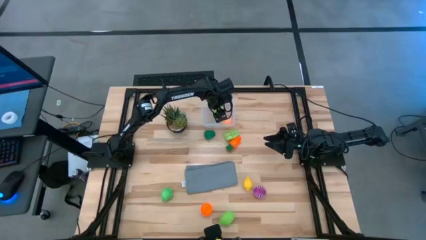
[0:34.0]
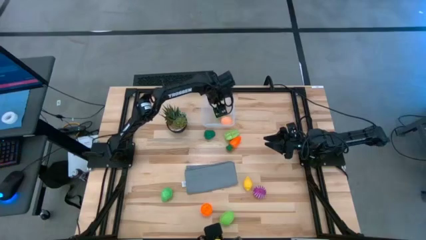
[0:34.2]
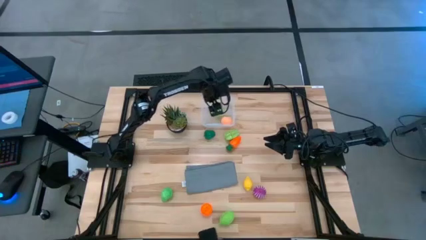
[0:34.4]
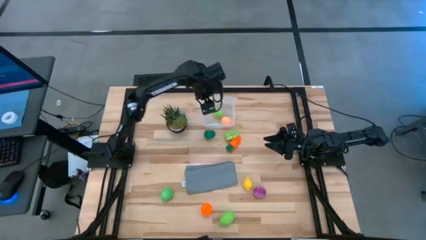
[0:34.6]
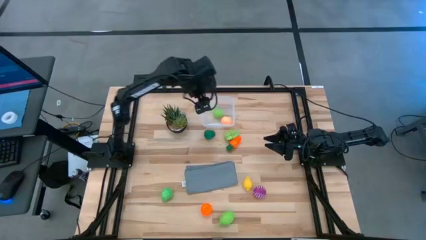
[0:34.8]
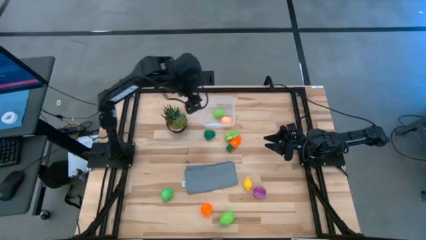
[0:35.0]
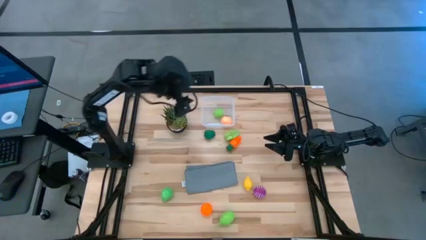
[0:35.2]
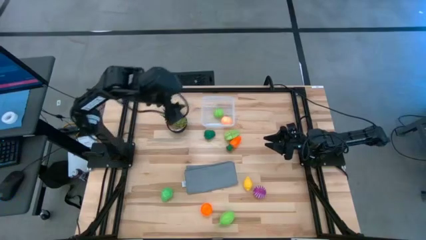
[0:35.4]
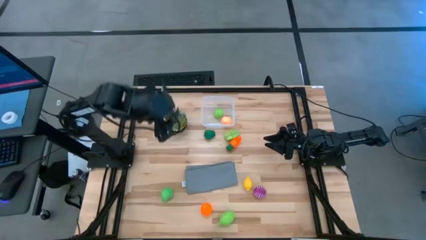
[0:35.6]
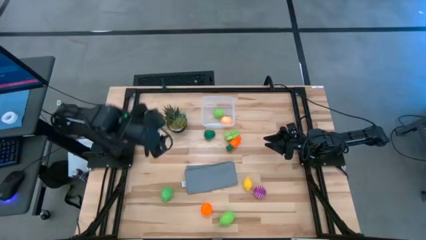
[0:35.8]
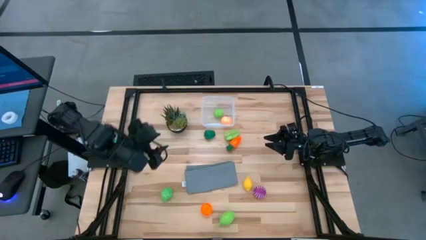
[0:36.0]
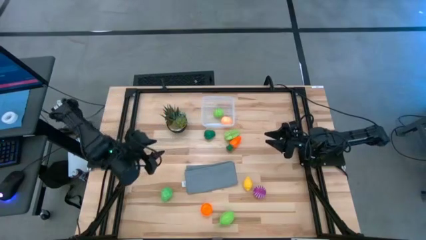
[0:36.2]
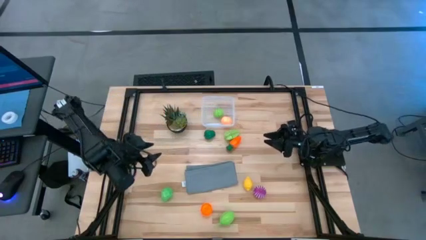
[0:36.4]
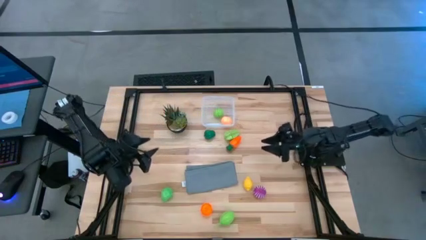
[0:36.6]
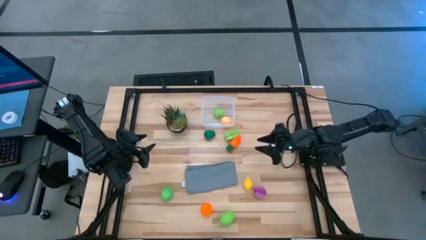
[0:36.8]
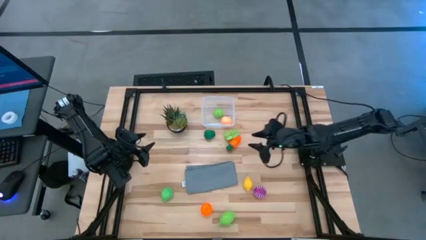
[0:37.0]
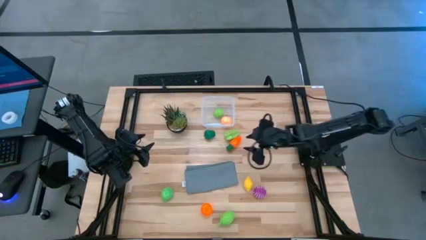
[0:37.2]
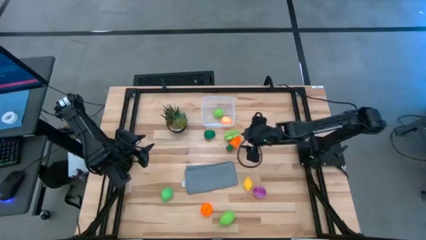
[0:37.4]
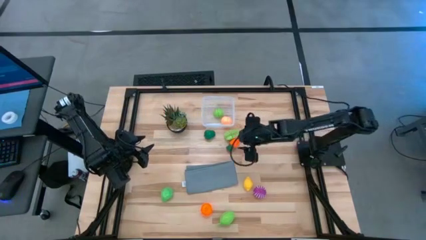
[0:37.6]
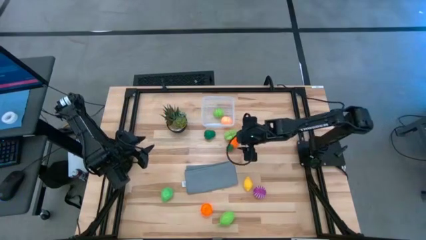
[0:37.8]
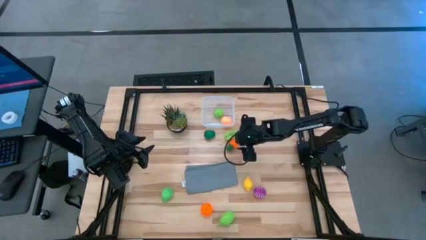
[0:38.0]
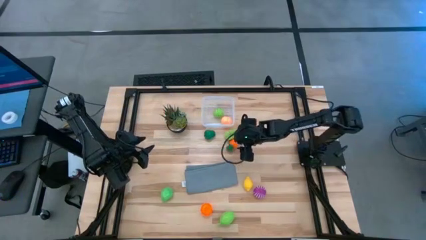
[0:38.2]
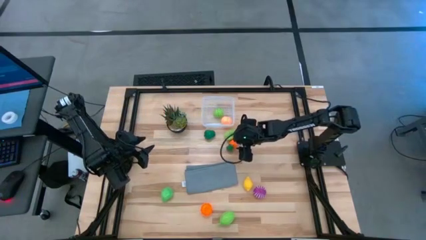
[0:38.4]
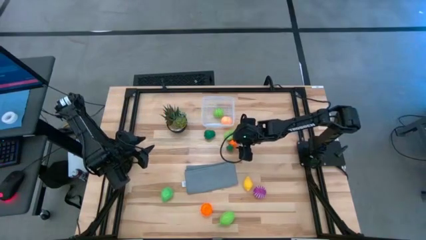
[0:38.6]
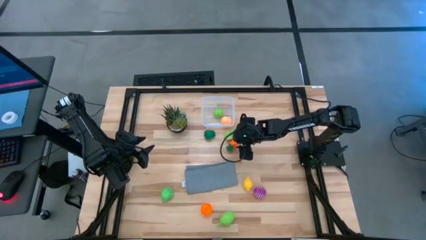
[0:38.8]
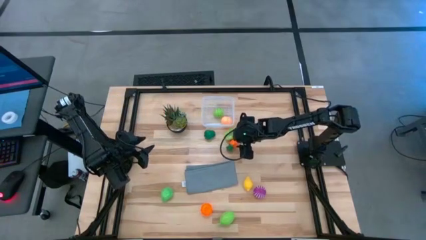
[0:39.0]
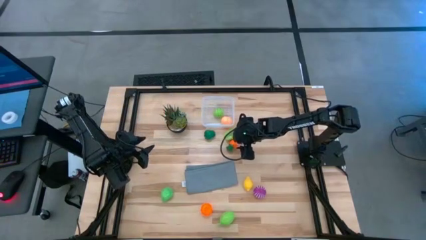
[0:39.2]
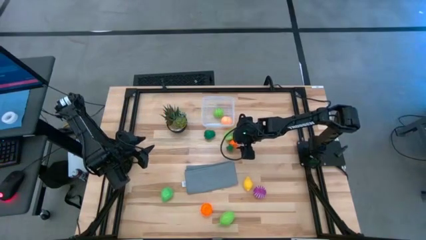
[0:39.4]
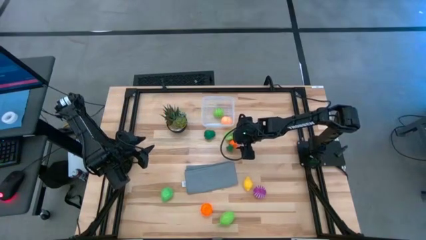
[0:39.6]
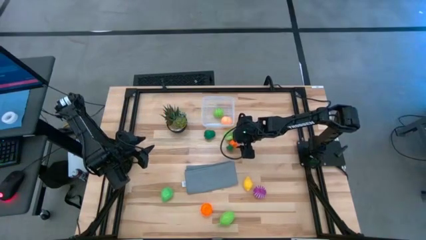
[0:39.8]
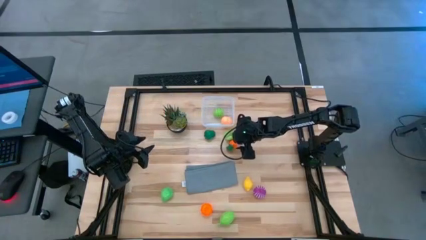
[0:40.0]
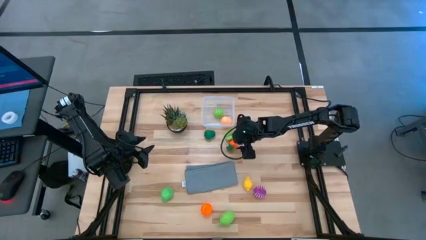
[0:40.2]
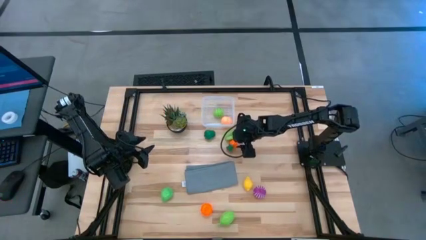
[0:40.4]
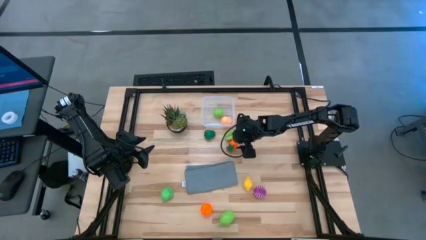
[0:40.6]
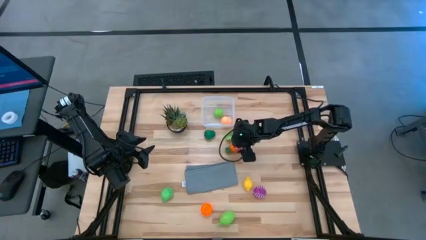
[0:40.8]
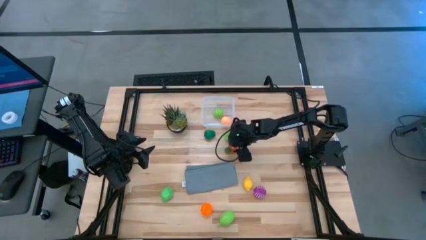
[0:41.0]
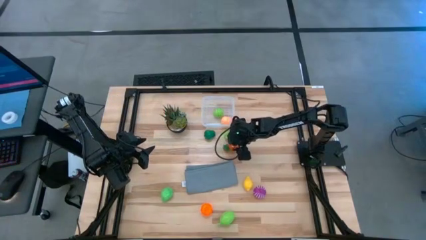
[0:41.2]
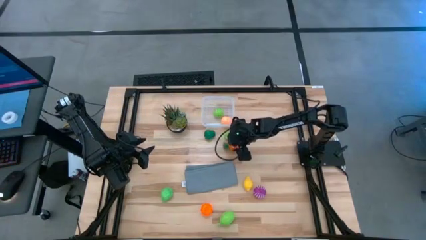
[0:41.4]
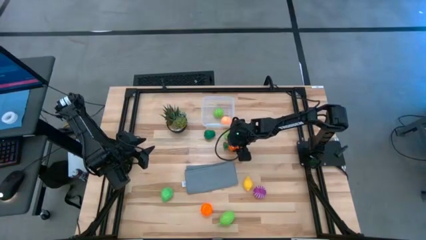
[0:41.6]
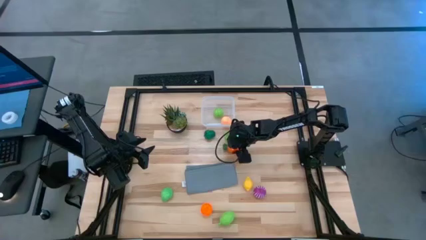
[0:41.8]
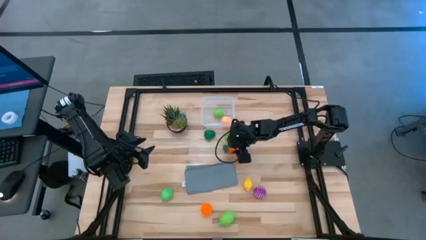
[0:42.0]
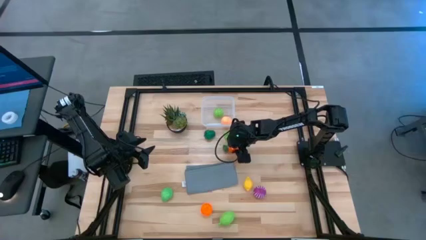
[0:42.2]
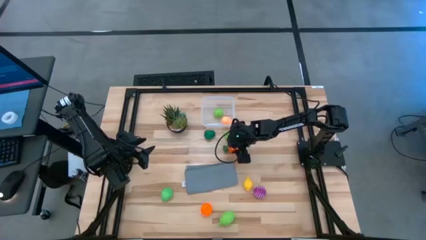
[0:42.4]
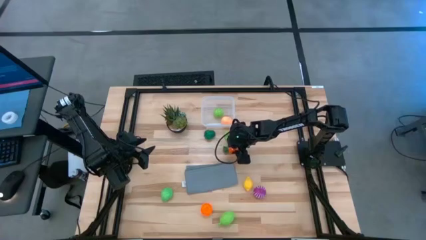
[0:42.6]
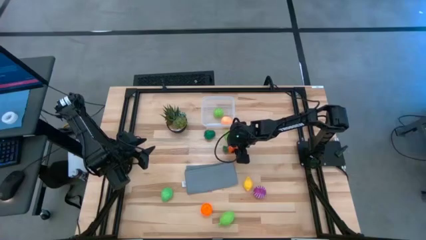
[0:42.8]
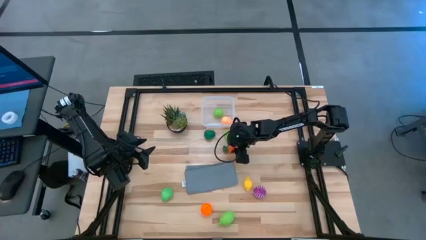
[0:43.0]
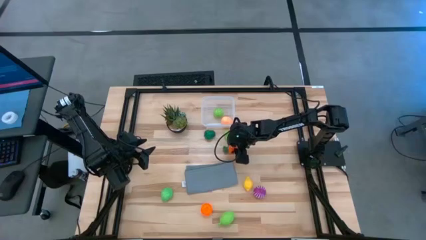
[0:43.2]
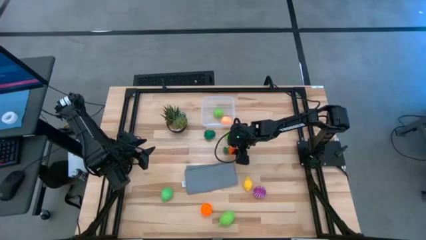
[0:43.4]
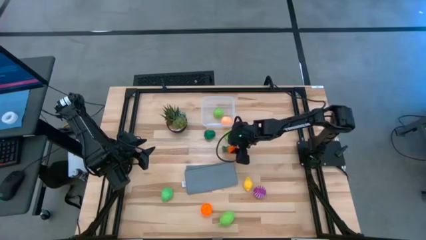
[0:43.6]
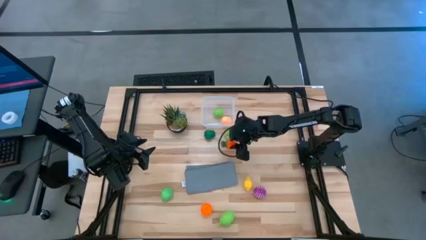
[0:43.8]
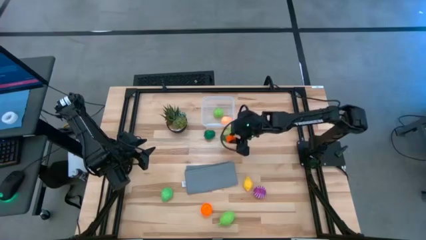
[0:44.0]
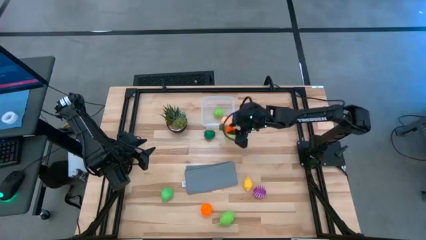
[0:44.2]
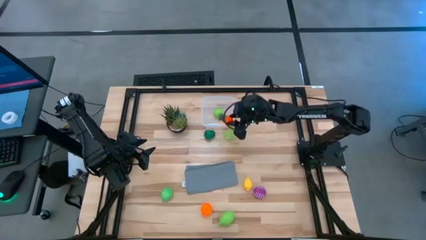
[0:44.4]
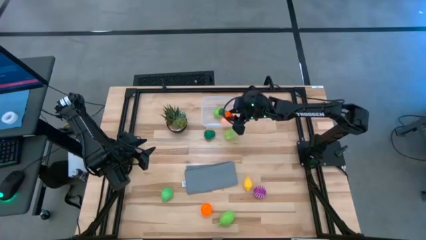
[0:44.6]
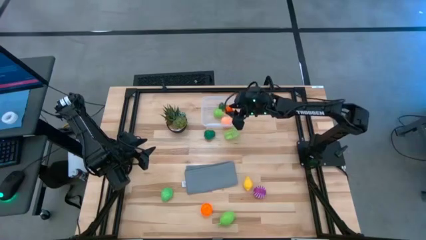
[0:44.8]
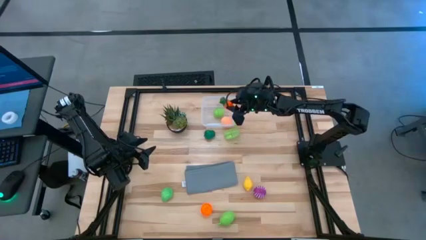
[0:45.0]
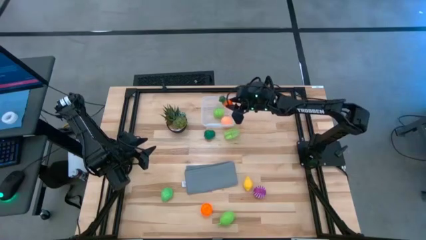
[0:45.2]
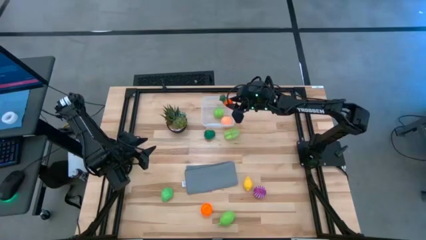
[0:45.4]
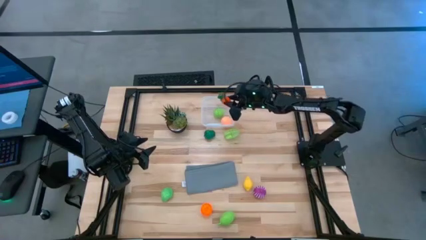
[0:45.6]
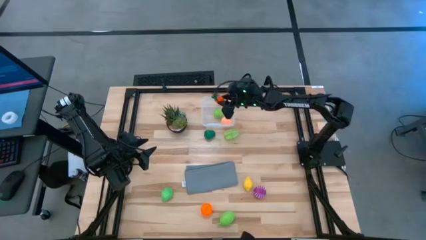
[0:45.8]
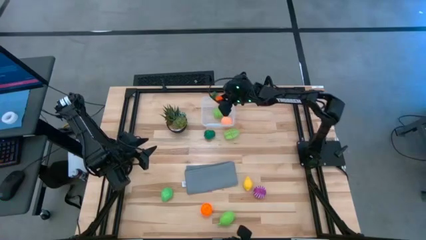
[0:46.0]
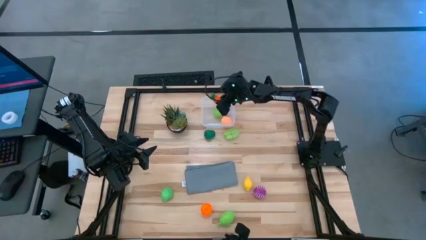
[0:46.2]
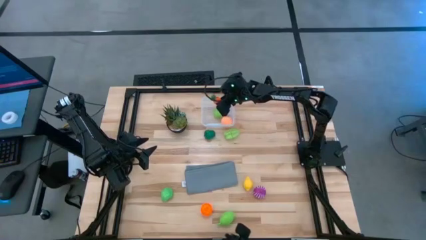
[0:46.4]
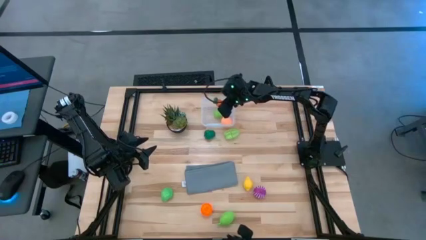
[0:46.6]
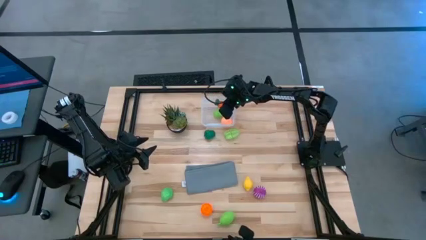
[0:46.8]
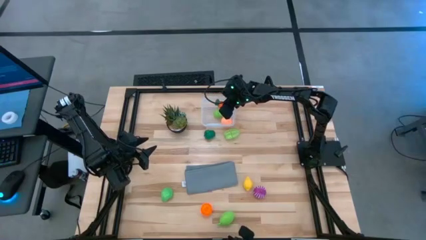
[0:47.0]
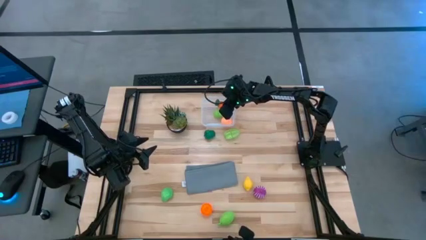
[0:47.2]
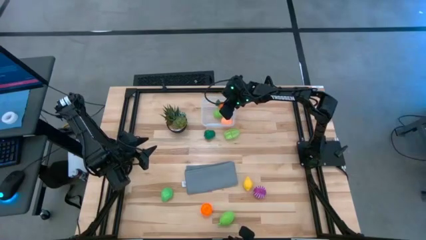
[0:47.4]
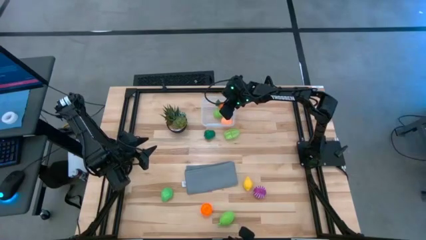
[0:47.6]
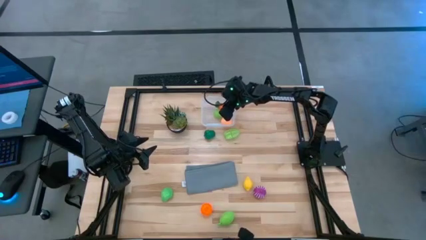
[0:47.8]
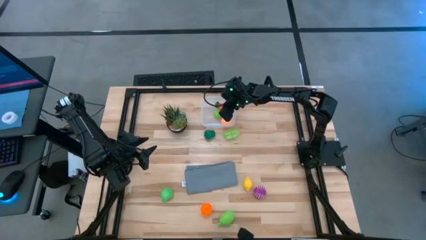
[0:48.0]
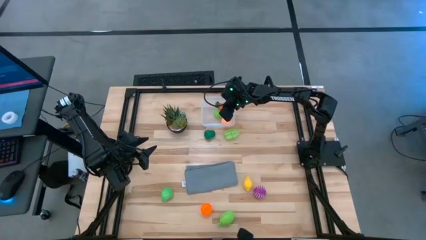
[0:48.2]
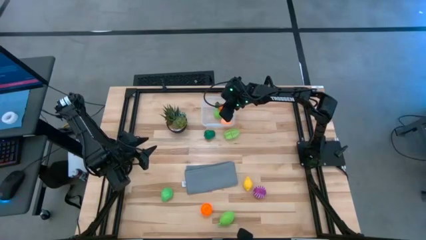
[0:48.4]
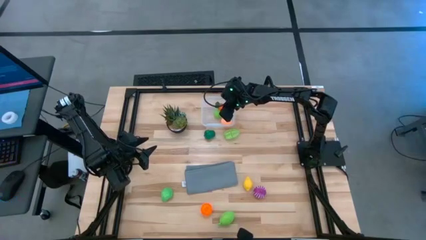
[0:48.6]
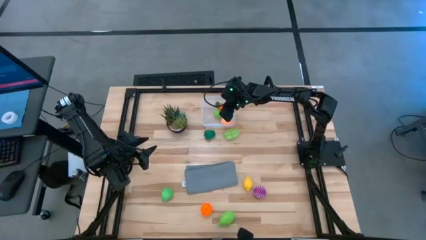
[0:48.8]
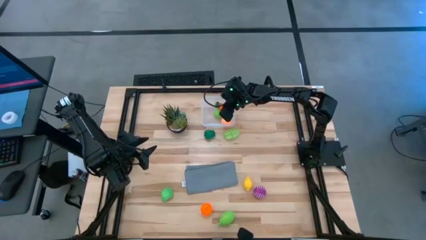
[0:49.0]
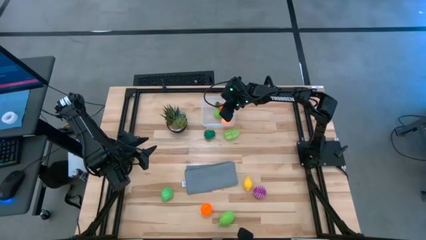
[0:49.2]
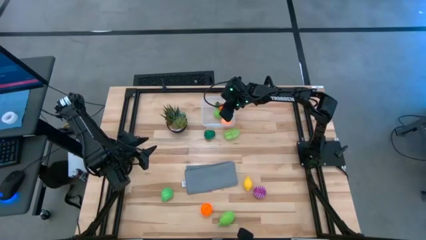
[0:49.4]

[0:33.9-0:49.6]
Task: Pick and placing Produce into tupperware
Put the carrot into the bin

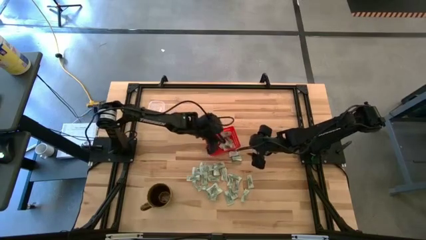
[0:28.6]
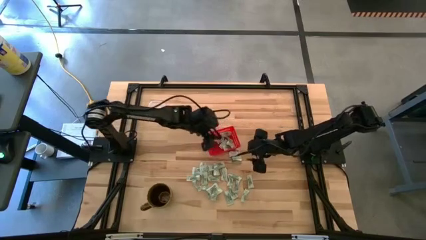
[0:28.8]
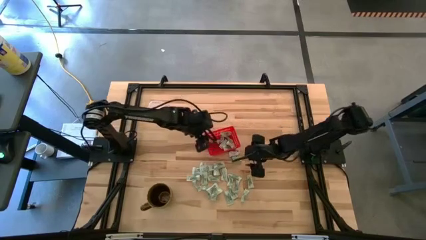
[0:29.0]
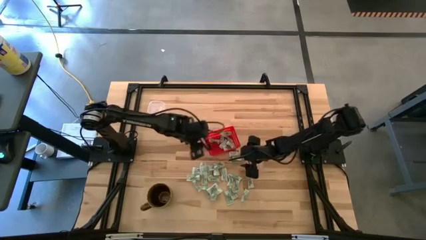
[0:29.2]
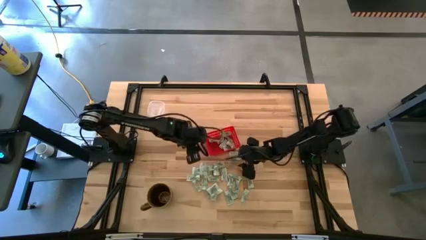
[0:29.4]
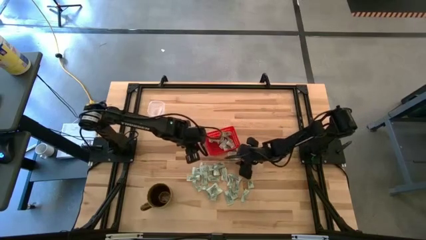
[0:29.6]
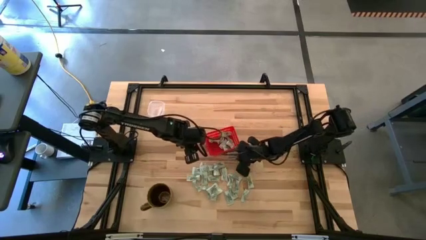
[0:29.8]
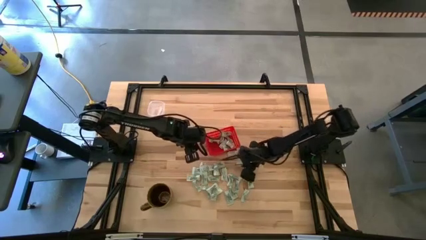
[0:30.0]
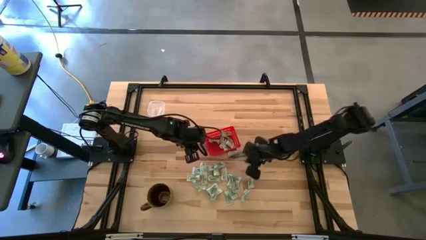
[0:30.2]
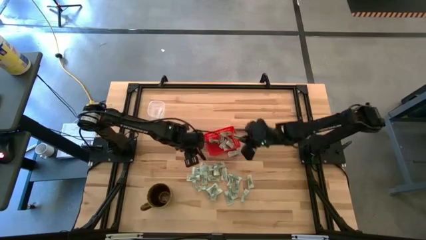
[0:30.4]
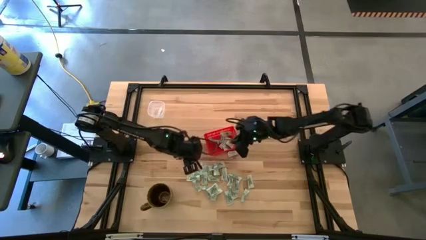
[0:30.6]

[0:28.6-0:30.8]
Task: Pick and place items into bin
Put the white truvia packet into the red bin
